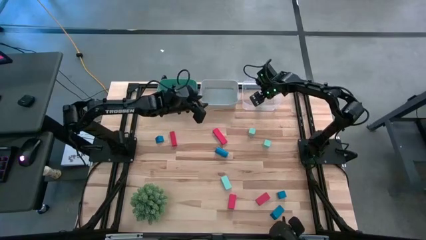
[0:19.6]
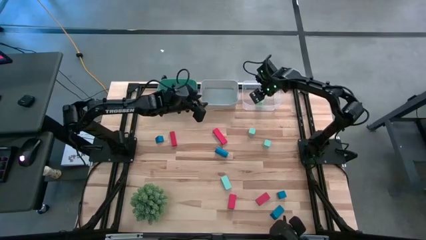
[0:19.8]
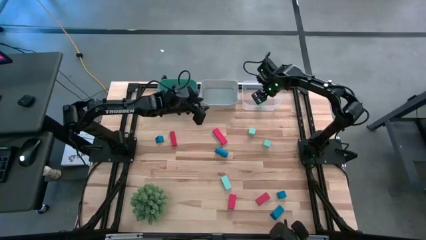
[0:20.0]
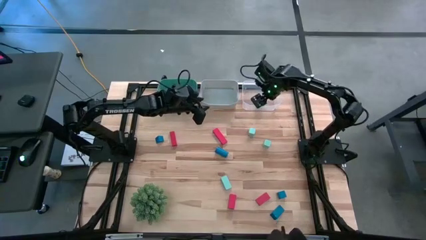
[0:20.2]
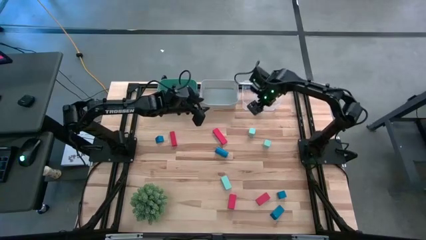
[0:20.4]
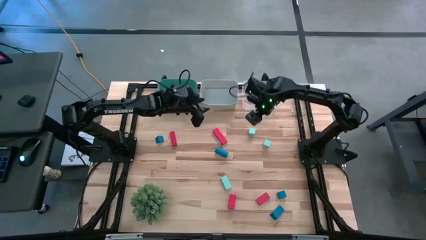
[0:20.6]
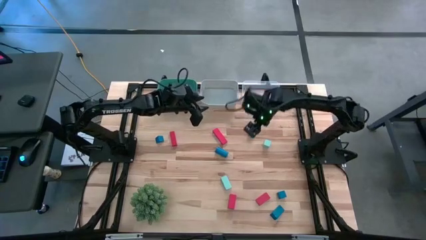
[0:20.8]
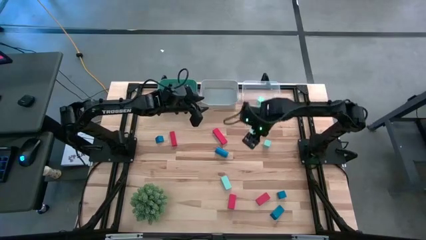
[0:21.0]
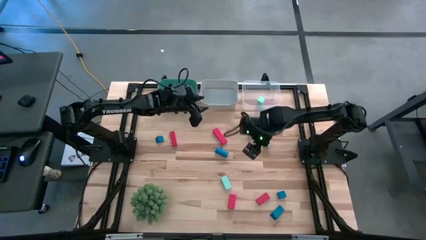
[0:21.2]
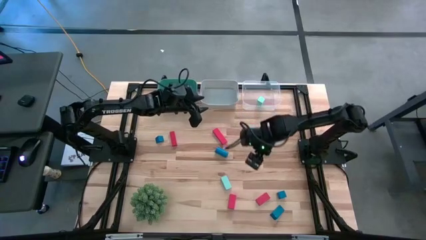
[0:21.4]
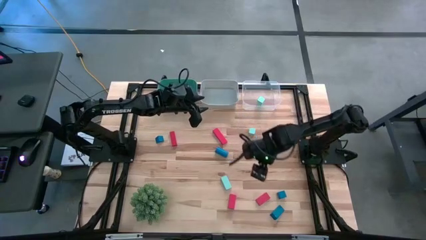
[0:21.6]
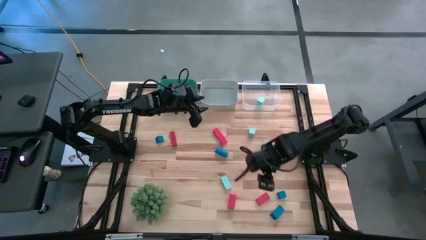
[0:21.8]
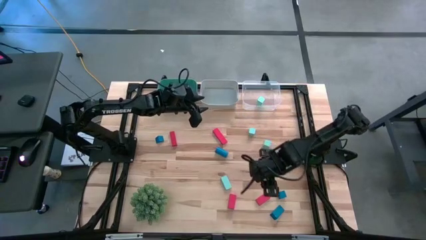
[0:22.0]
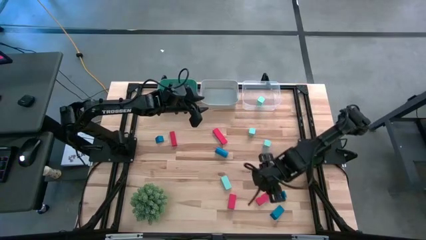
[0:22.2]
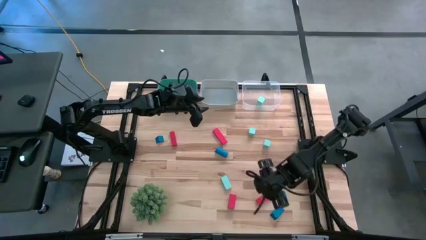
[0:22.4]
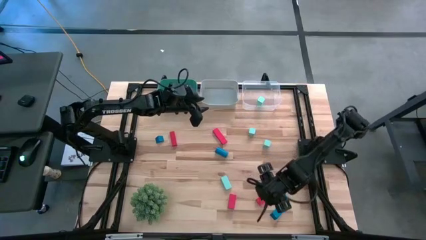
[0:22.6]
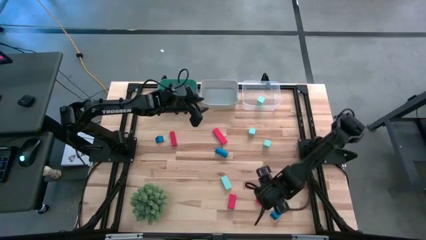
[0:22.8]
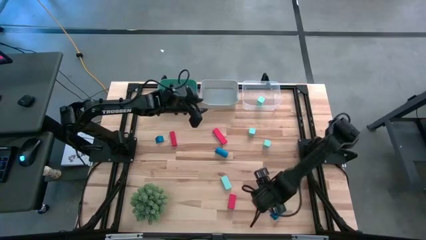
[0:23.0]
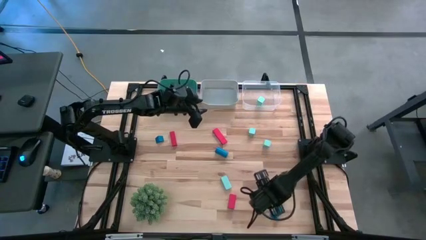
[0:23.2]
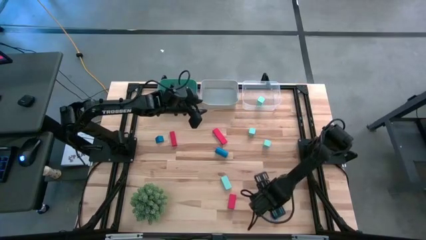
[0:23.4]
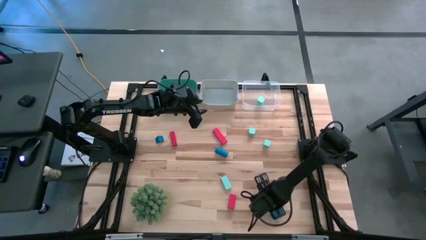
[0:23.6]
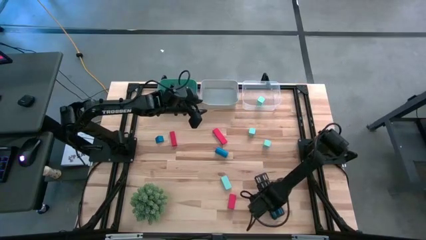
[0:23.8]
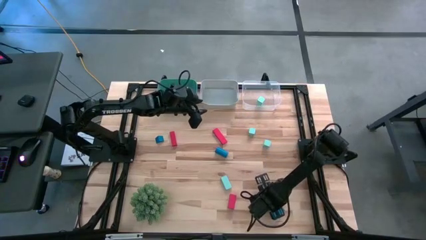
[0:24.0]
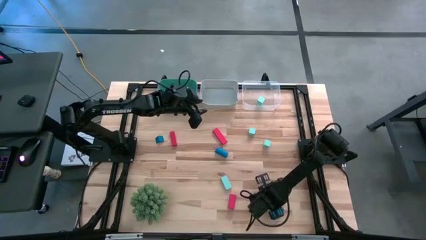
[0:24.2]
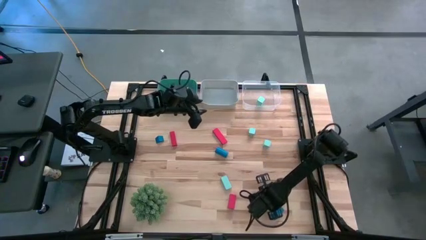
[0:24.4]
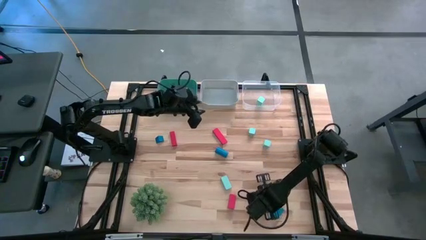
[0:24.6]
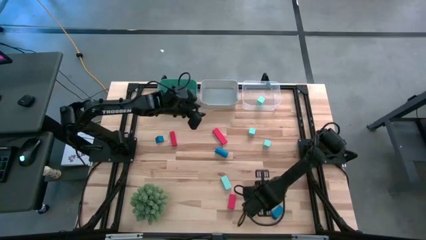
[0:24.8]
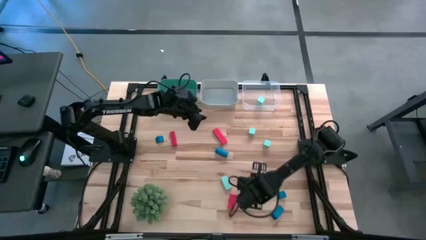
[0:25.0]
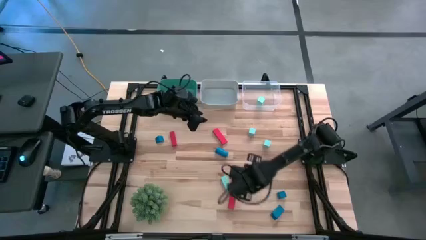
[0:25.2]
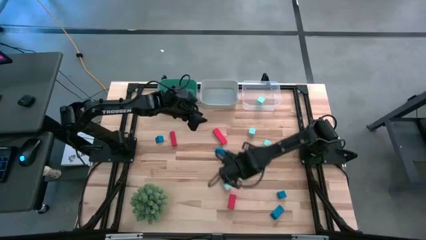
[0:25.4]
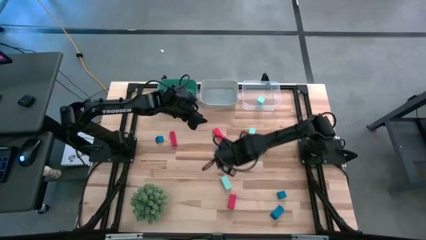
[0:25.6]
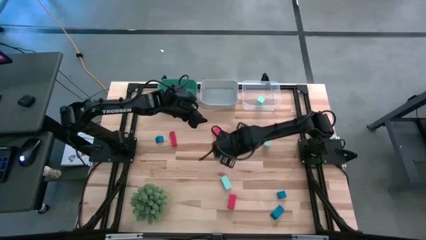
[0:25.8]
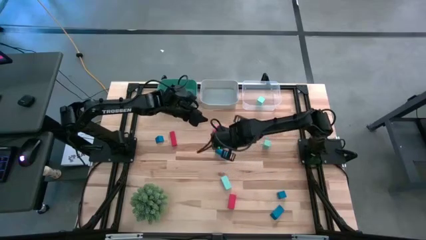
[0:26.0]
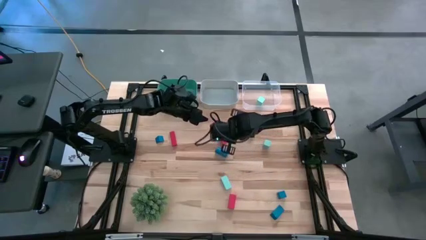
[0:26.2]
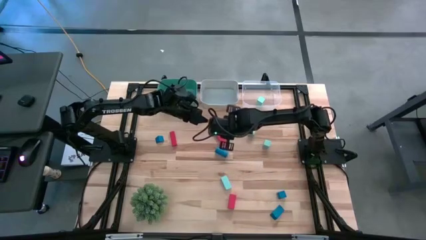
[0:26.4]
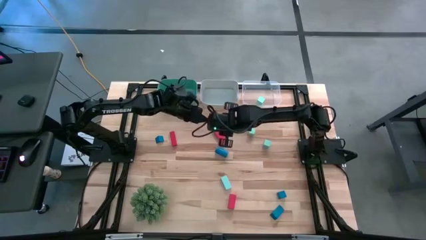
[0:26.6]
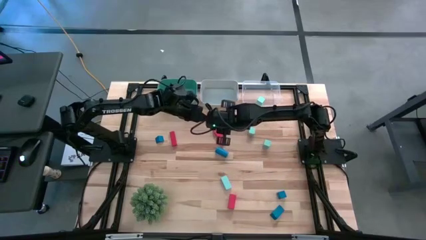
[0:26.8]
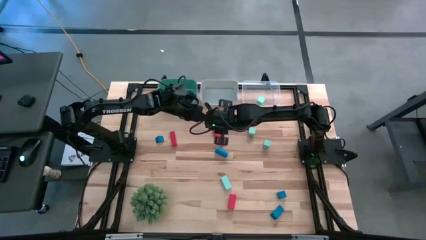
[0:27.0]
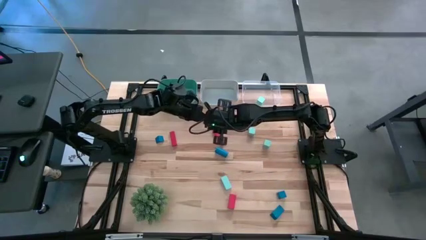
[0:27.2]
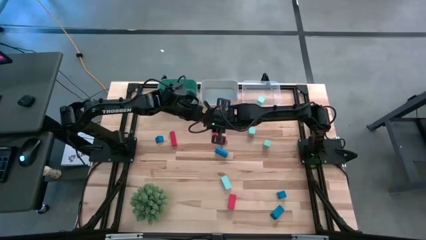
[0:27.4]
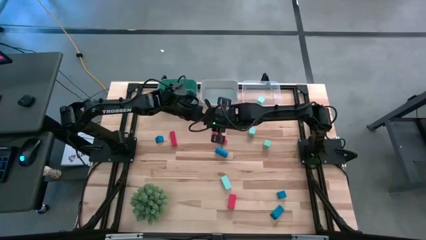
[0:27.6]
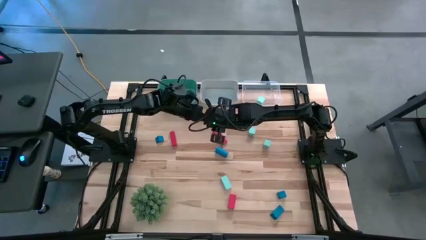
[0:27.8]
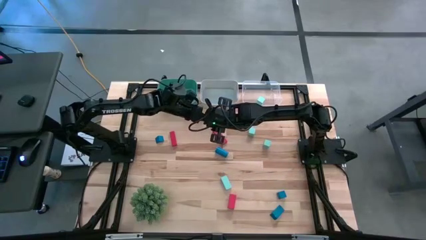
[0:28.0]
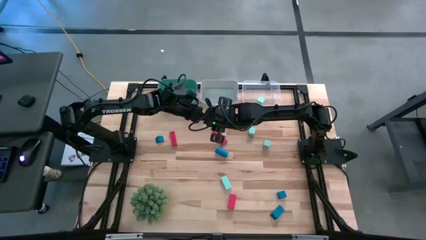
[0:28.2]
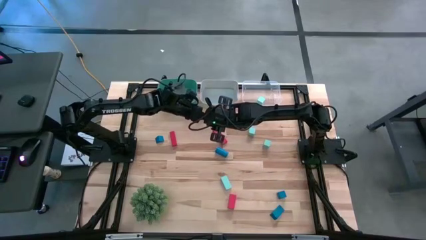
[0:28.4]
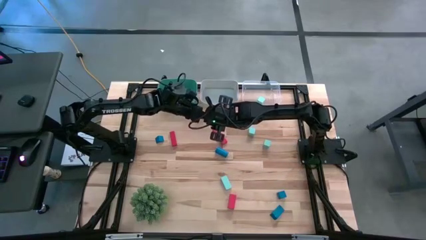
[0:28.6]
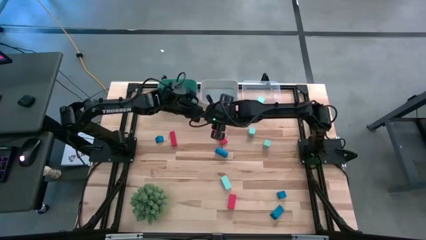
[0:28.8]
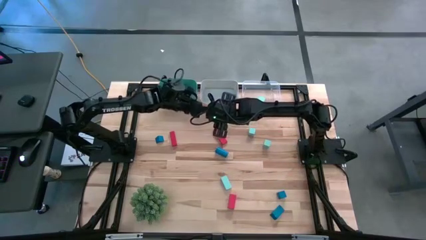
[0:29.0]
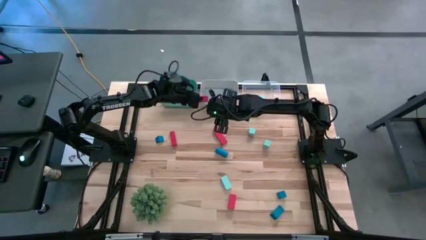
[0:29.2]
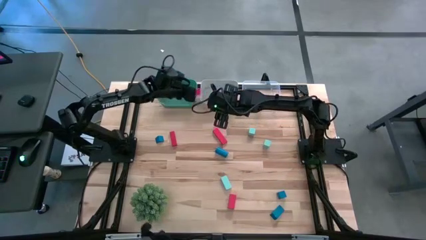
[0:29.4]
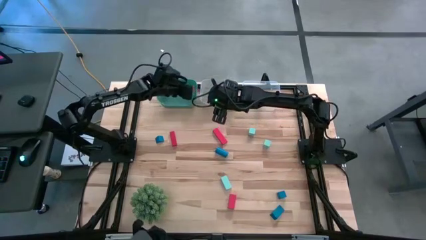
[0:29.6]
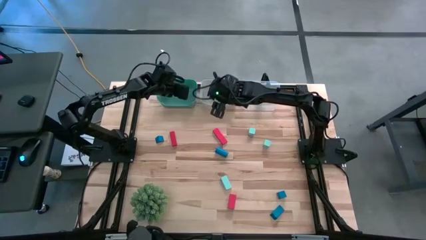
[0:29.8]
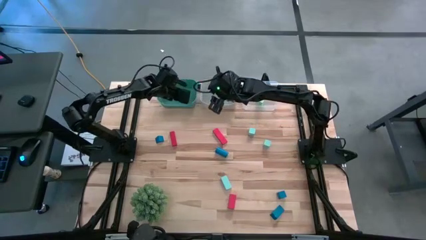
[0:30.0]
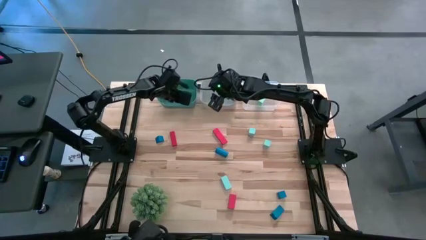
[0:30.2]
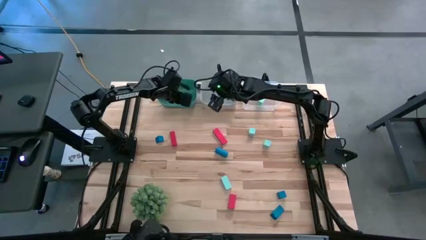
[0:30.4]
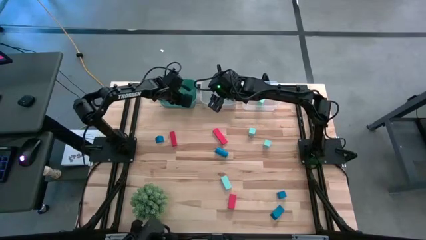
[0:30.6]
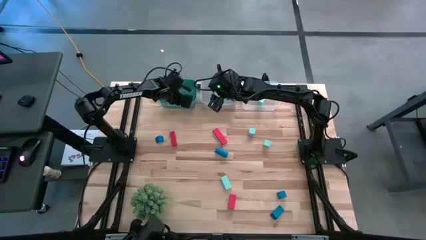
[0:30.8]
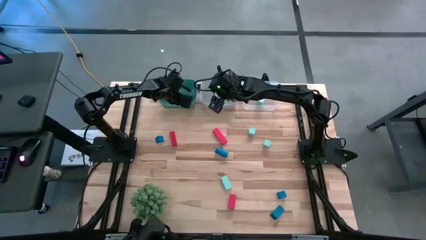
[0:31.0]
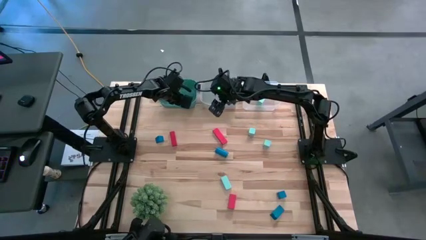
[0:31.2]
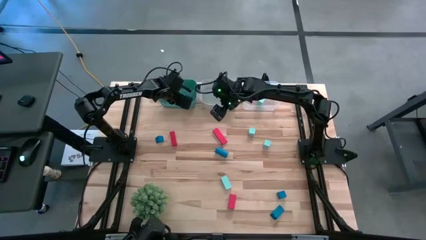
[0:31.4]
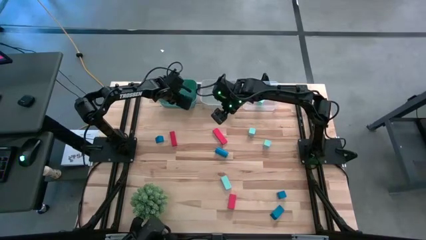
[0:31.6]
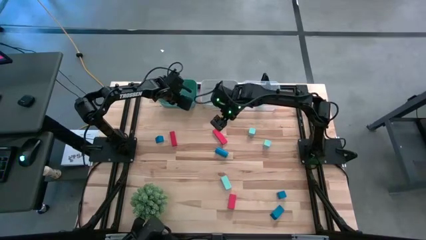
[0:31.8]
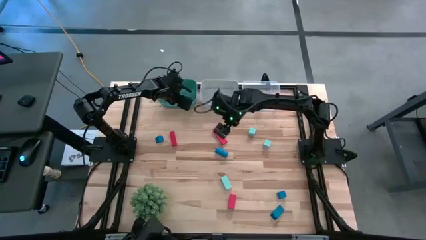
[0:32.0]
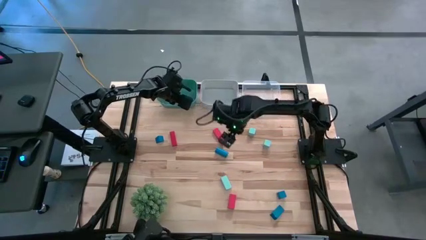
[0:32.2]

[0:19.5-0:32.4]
Task: Sort & place blocks by color
Put the red block into the green bin

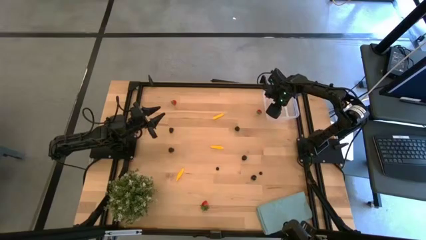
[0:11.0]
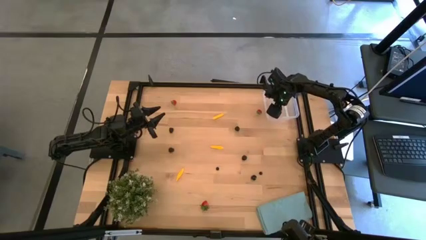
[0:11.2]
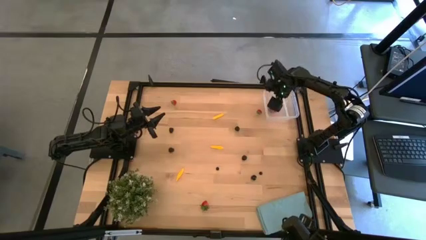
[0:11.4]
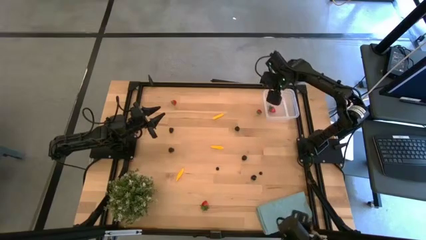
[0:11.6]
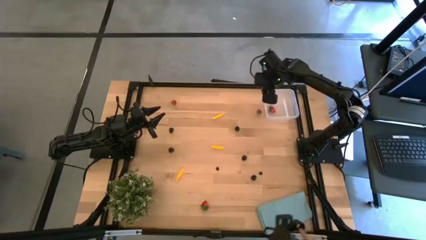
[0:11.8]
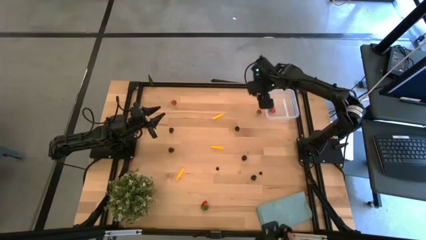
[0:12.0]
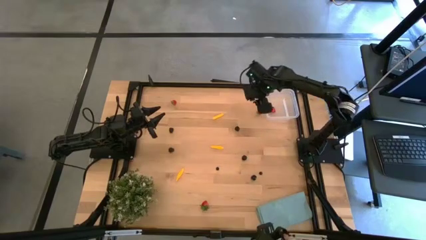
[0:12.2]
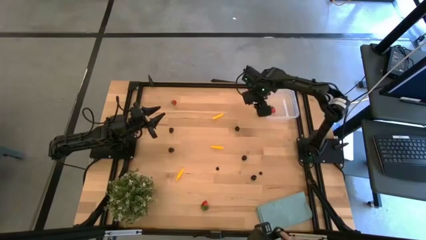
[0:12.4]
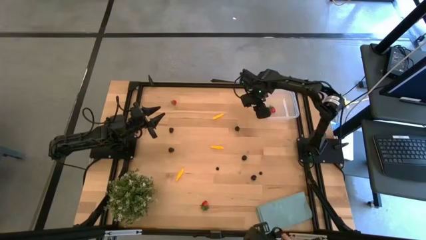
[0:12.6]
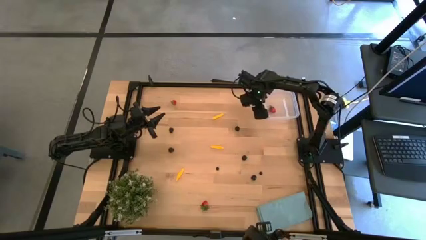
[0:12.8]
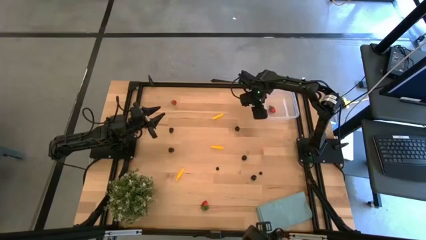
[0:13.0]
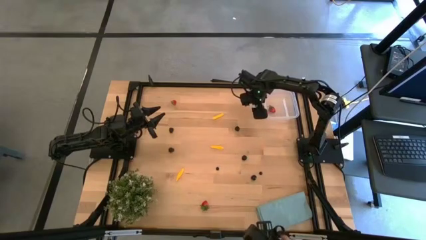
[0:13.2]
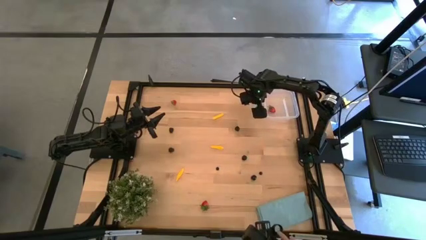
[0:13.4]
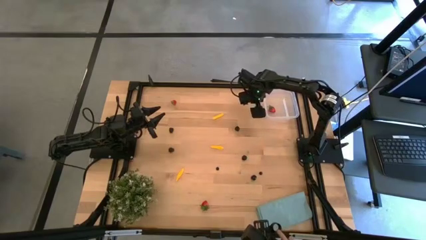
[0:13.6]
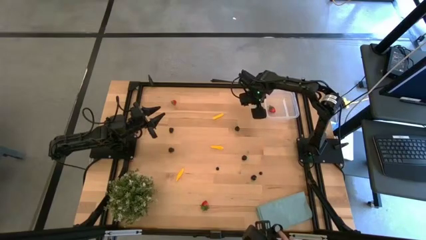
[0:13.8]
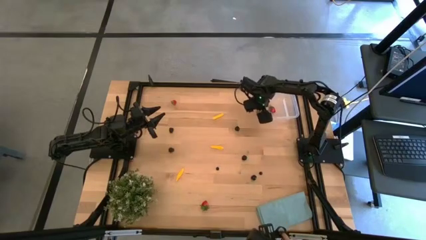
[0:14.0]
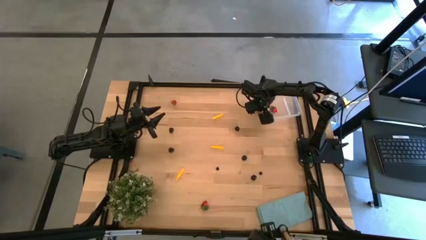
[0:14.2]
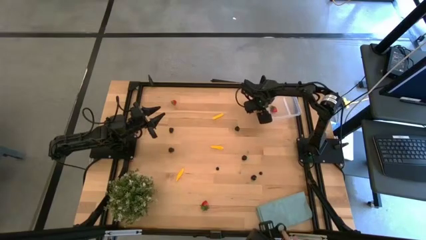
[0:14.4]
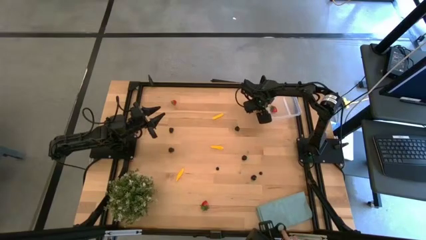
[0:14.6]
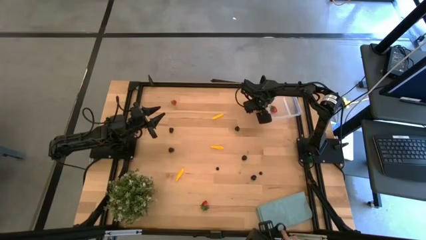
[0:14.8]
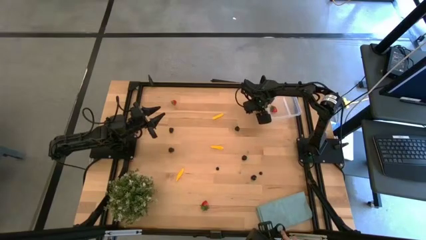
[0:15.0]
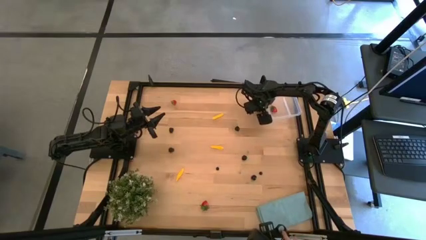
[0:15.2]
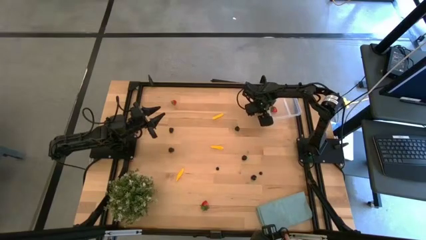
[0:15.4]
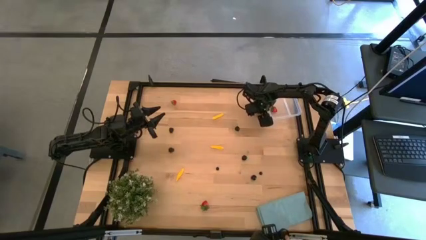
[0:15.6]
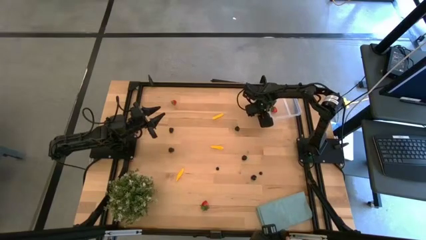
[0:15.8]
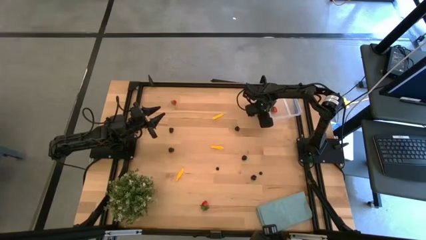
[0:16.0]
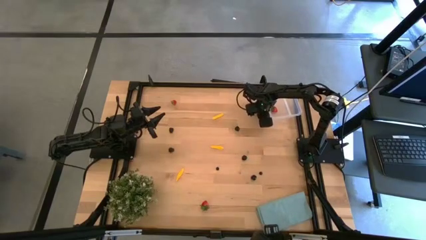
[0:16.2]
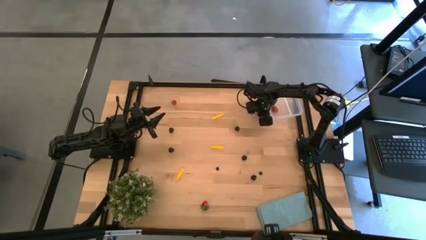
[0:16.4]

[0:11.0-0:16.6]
Task: Pick and placing Produce into tupperware
Put the red strawberry into the transparent bin
